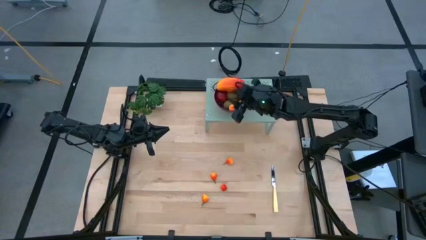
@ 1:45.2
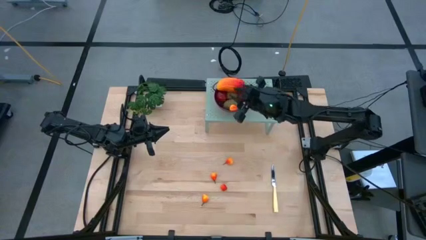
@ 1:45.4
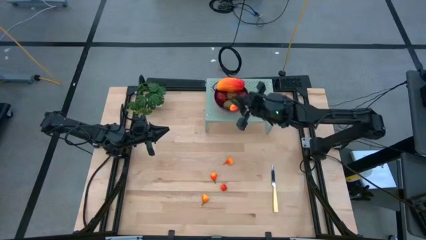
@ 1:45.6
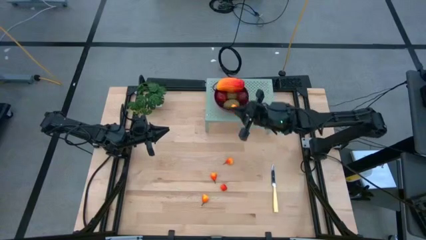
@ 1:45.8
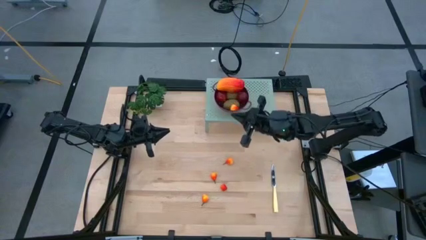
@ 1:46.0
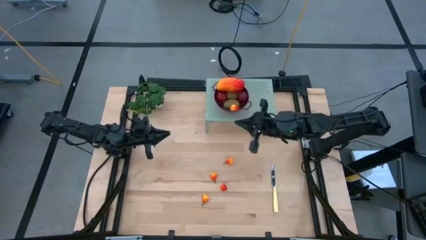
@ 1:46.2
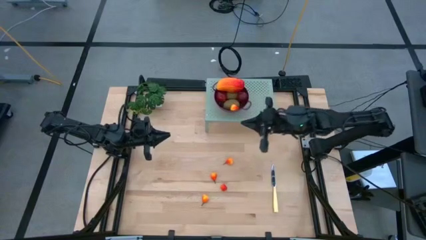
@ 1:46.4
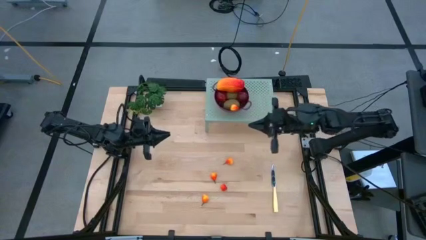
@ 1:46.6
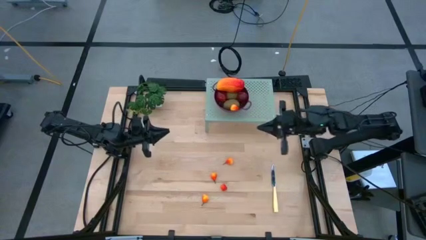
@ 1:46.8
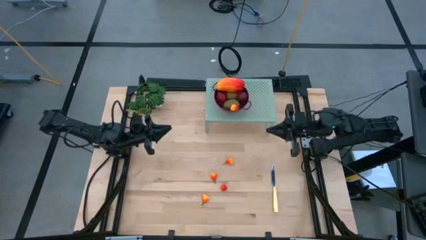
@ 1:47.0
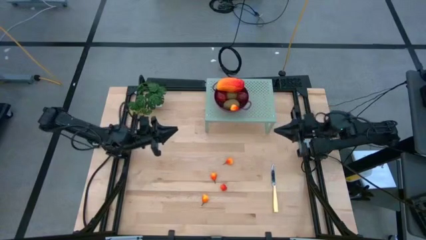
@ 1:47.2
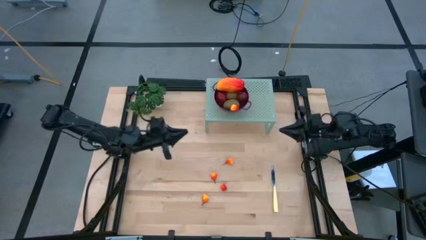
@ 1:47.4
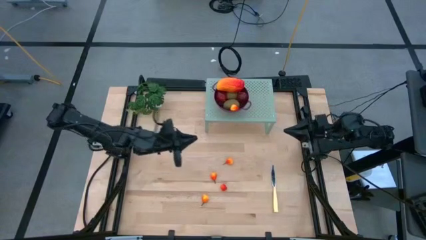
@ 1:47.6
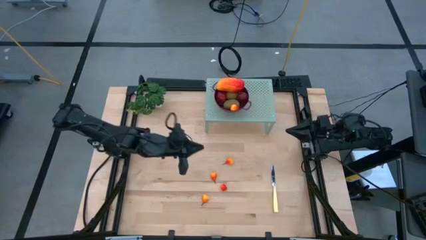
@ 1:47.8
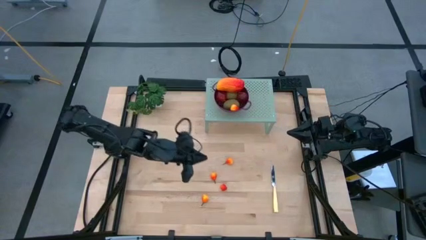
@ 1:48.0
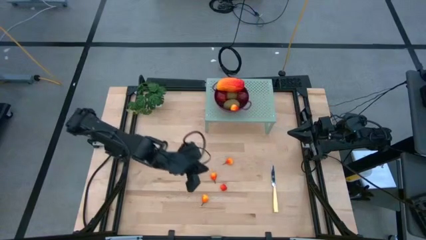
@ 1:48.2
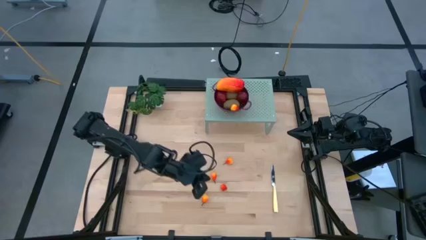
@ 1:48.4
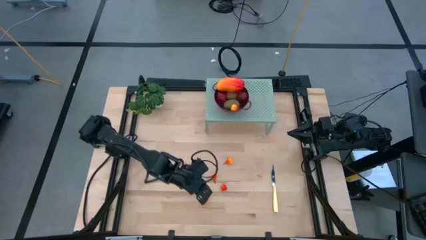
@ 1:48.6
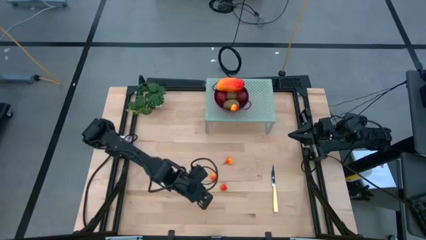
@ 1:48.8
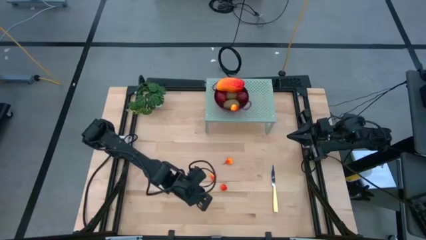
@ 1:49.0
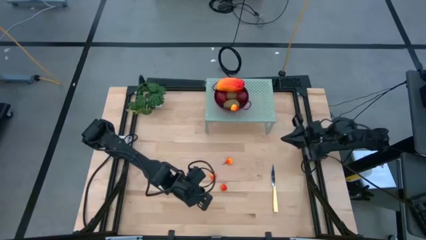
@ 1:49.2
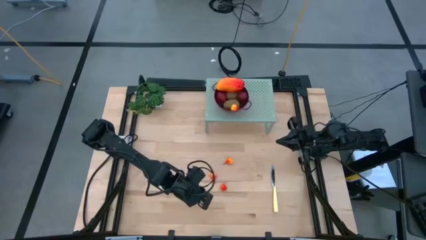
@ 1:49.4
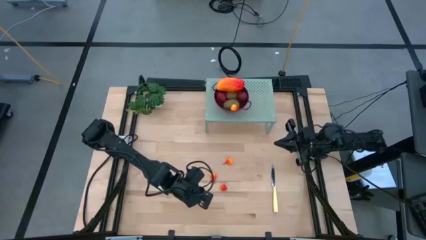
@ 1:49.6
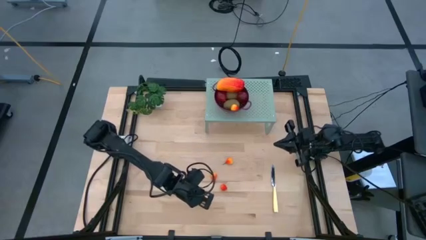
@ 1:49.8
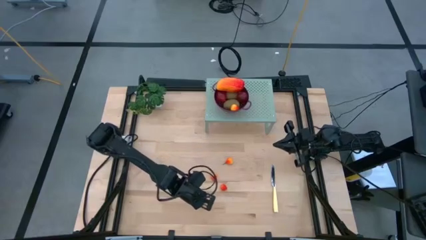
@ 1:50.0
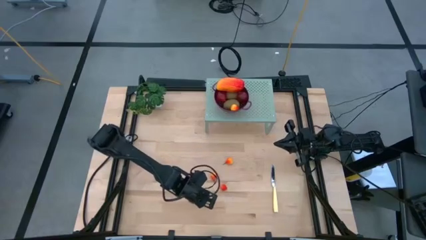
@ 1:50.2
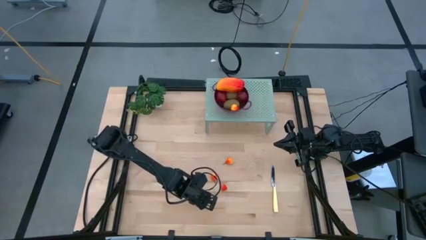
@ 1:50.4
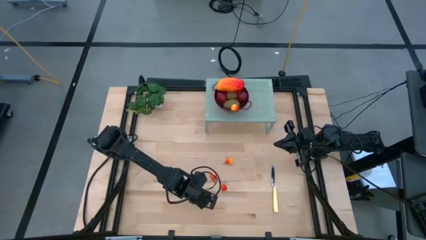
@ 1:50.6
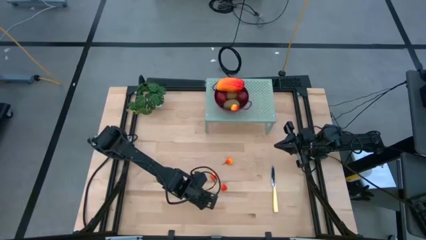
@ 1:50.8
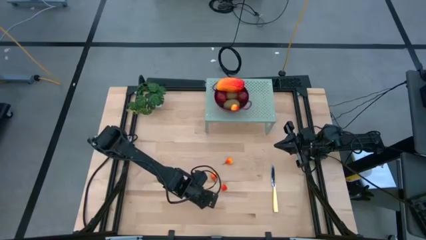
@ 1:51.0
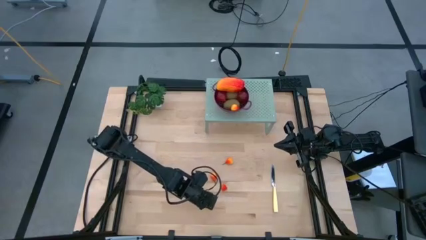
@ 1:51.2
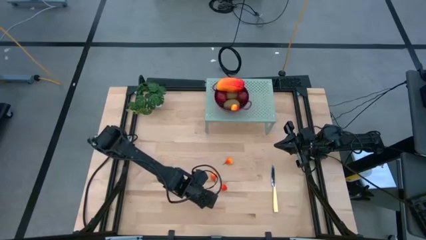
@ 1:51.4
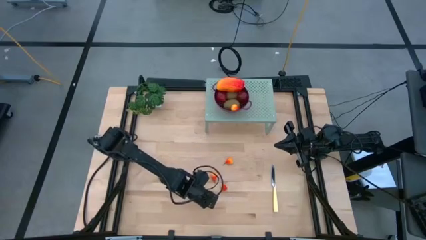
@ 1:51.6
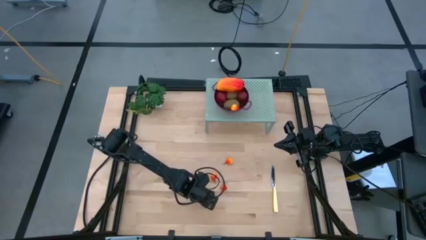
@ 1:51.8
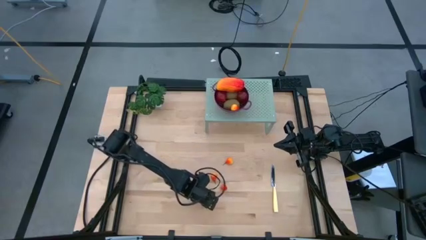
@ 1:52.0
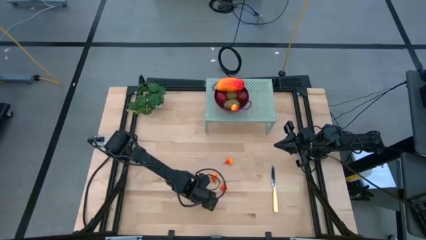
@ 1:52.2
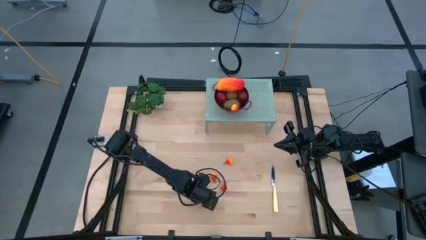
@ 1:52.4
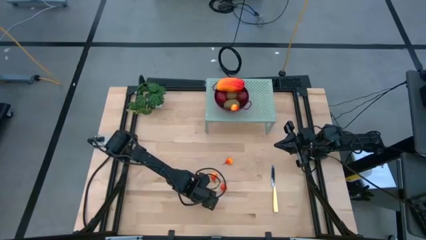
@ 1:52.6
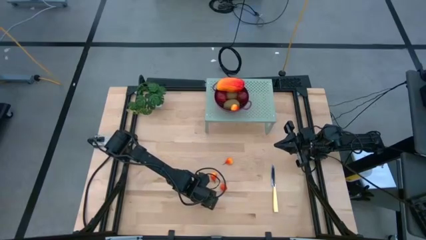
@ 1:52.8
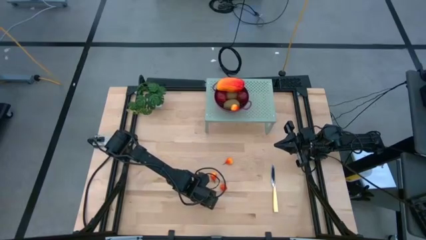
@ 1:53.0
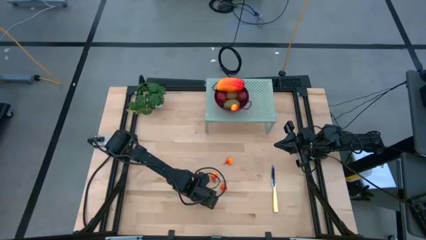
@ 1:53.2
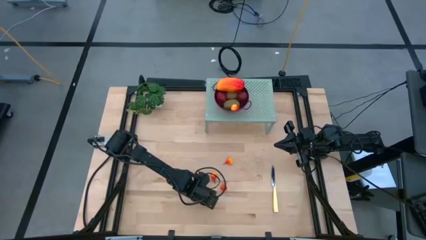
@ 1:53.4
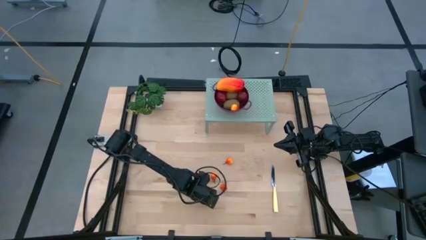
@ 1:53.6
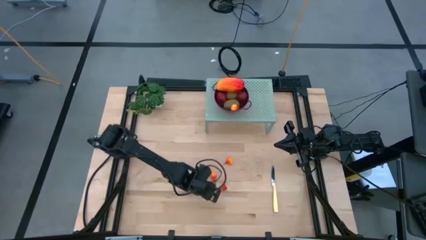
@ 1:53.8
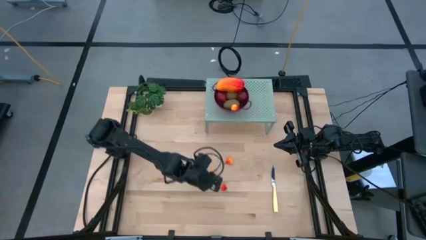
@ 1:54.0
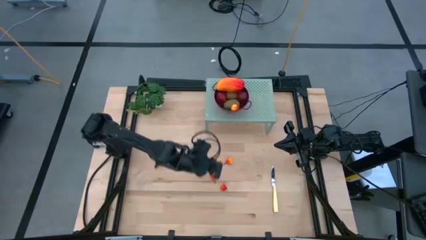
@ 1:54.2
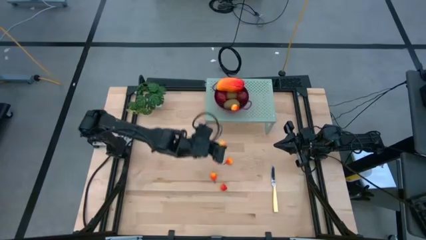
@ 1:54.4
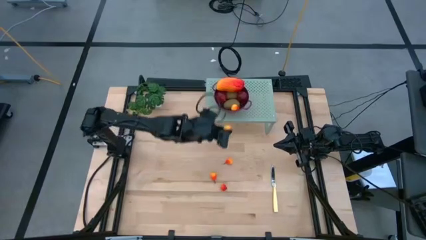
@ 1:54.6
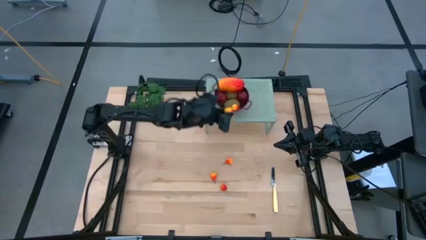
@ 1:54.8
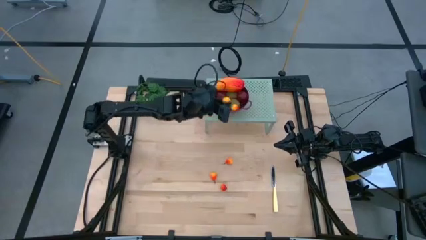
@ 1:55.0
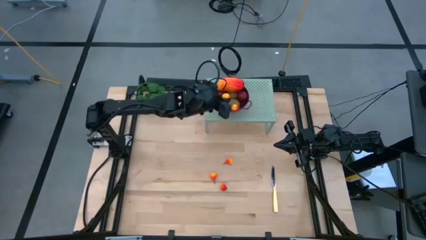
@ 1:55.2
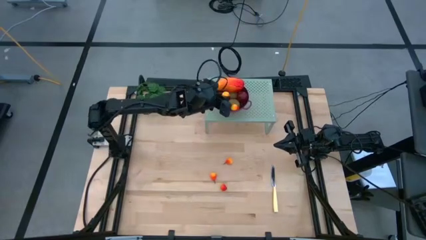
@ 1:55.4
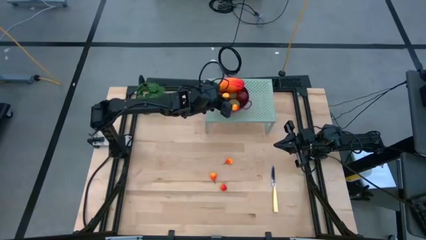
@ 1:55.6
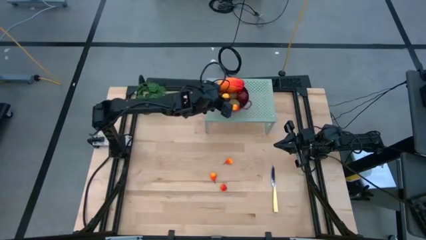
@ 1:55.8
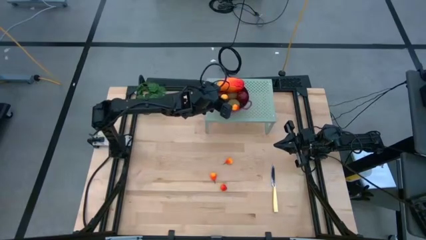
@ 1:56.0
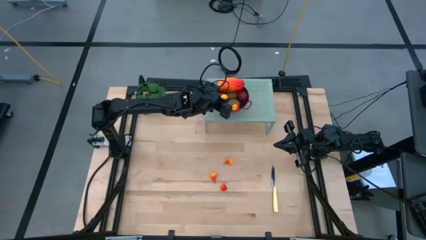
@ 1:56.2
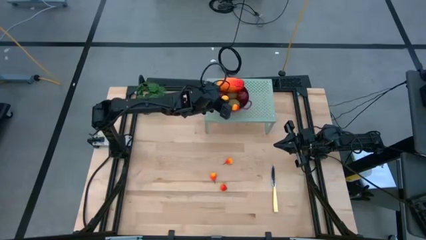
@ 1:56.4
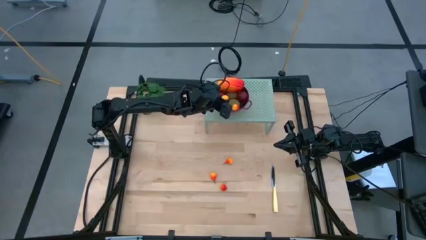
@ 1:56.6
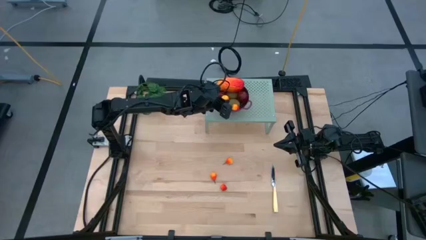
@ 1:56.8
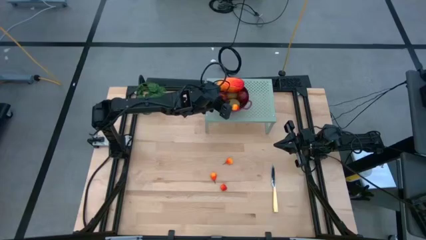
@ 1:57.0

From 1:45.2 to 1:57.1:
Task: Pick & Place Fruit
Put the pear into the strainer bowl on the shelf

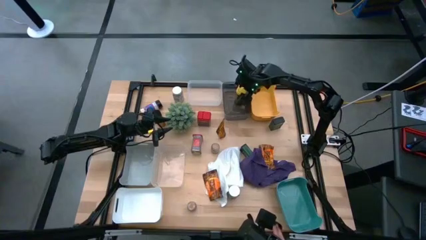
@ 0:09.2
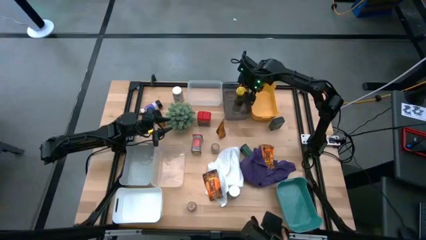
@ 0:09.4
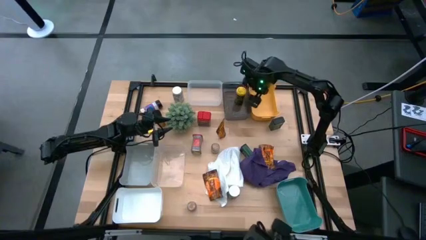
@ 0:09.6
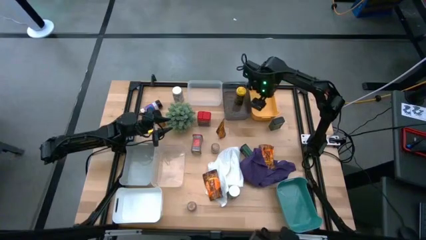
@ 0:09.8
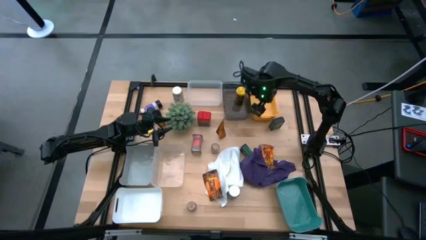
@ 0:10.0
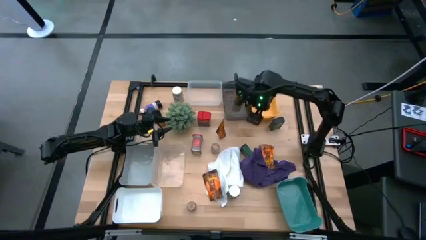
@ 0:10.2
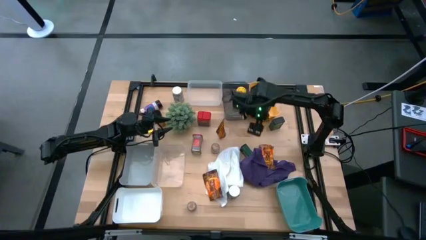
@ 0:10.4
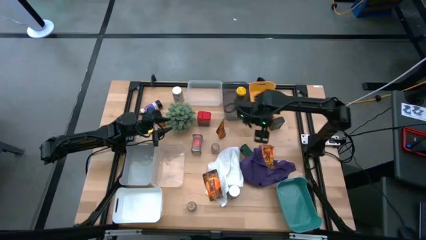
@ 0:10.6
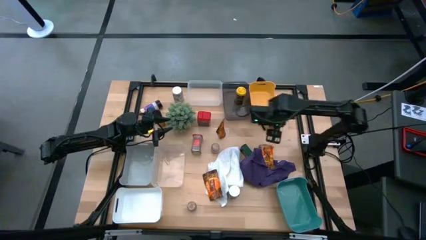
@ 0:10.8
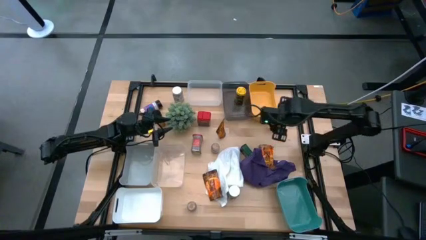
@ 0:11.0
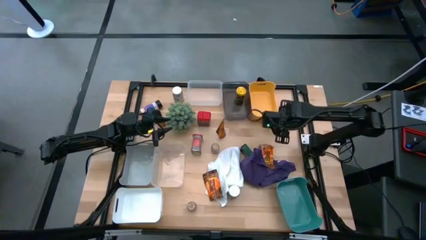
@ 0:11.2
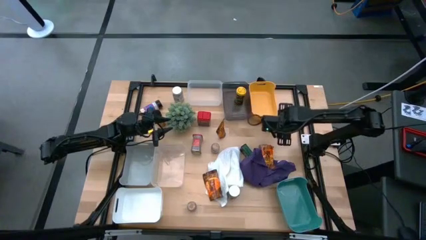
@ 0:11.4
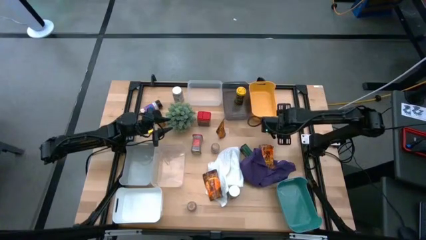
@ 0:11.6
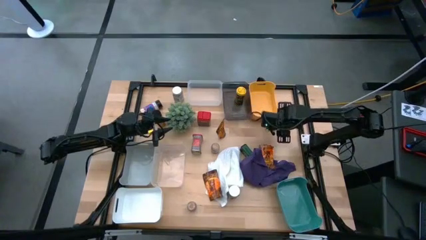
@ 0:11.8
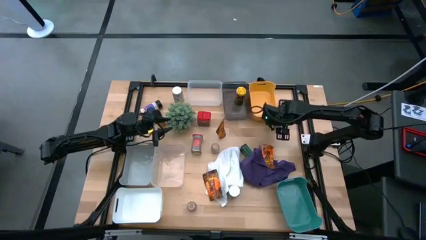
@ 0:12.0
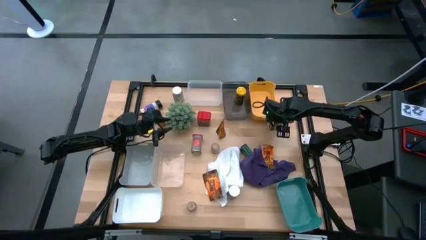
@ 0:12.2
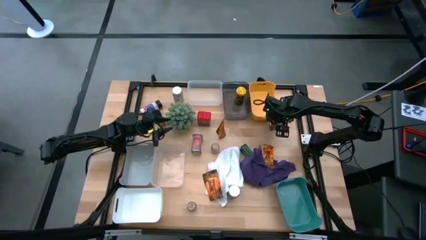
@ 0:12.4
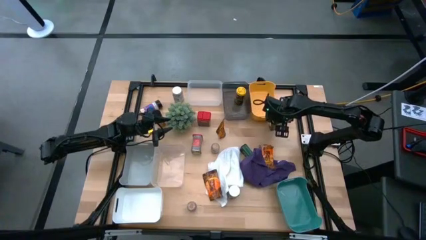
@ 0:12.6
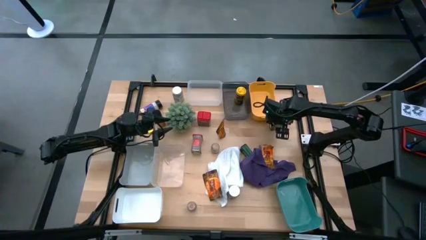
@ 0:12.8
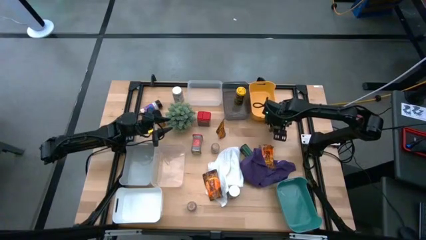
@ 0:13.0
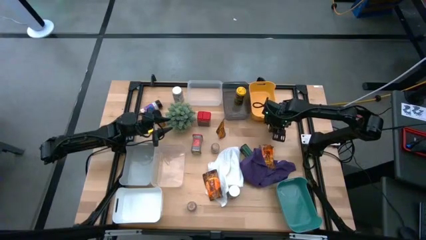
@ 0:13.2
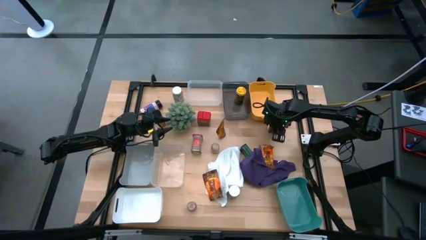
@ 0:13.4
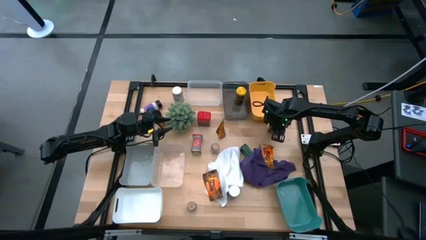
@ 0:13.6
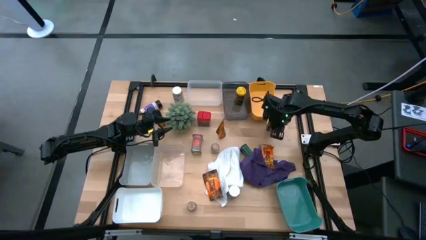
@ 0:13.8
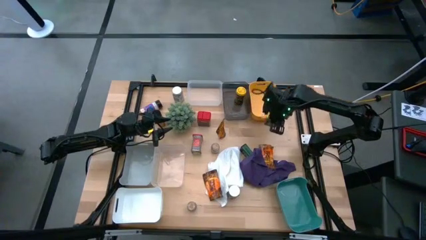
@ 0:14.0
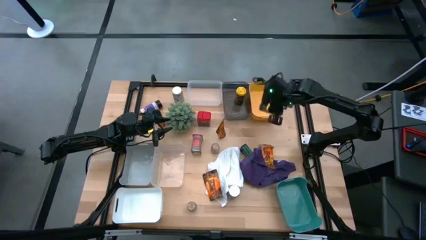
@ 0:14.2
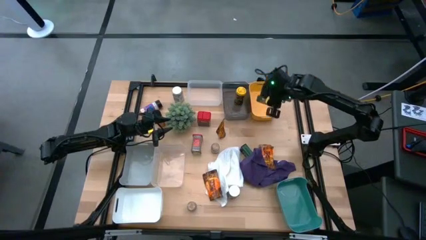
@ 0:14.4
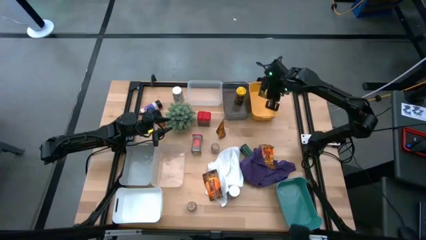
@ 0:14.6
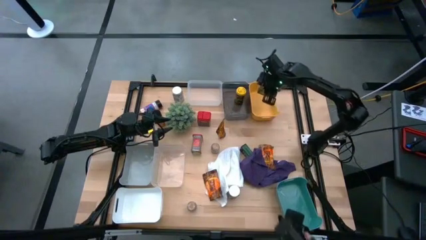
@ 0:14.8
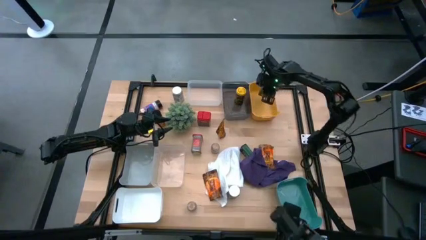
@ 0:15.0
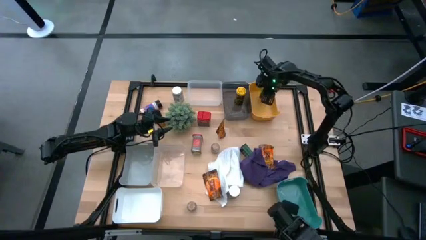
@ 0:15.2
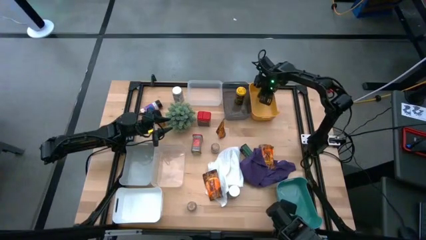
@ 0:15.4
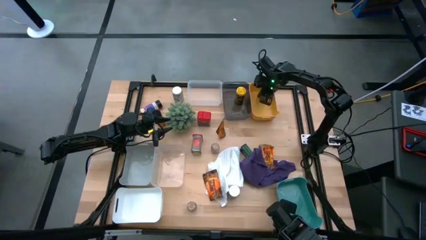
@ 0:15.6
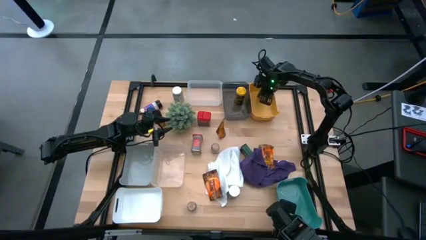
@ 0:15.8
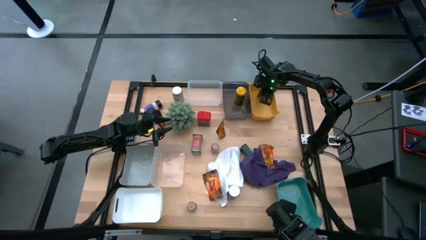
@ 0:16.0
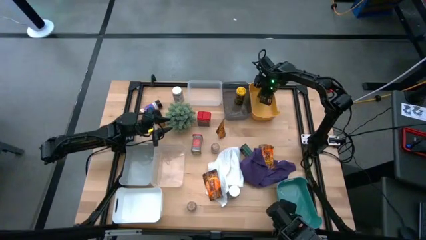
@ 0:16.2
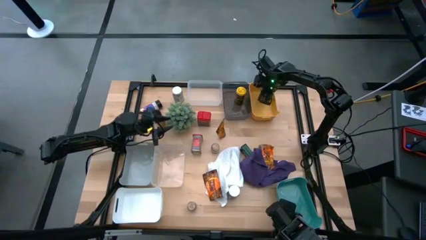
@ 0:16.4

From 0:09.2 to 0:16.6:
Task: Sort spices by type
Put the top black seasoning can into the yellow bin
